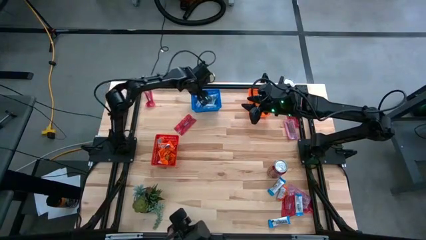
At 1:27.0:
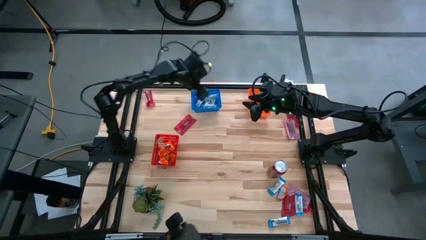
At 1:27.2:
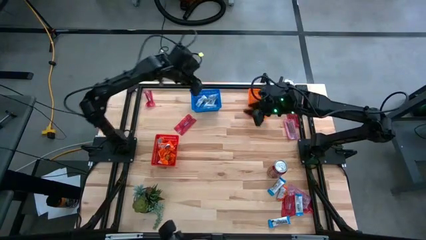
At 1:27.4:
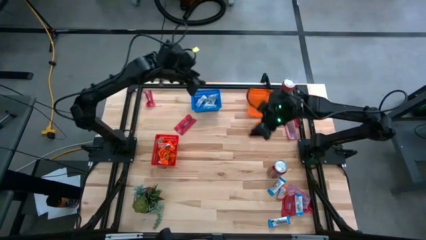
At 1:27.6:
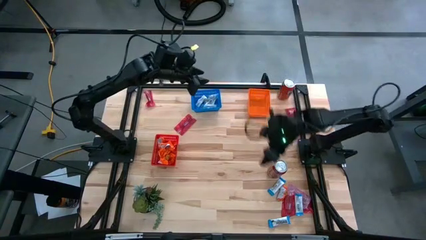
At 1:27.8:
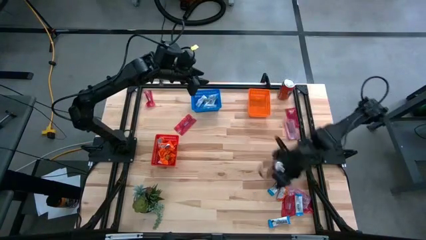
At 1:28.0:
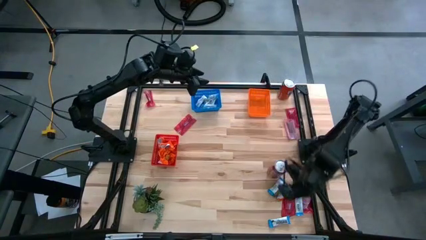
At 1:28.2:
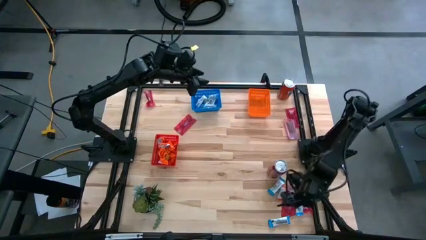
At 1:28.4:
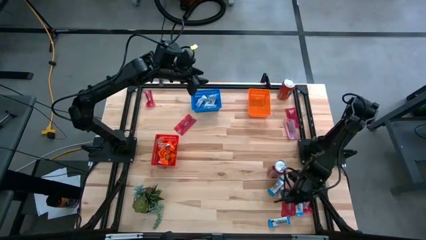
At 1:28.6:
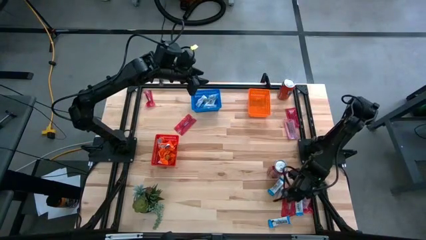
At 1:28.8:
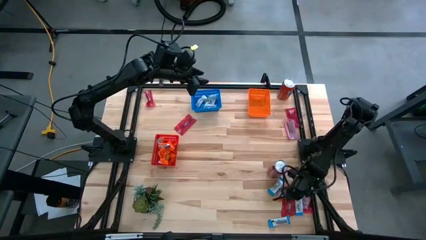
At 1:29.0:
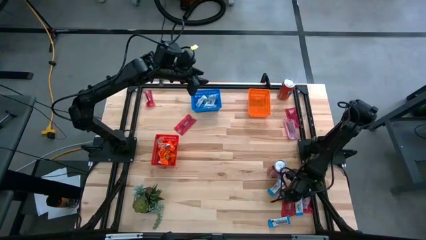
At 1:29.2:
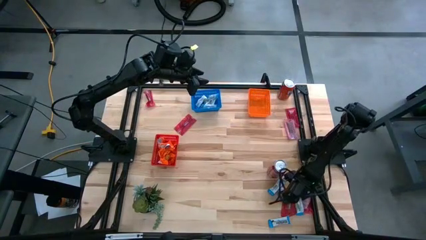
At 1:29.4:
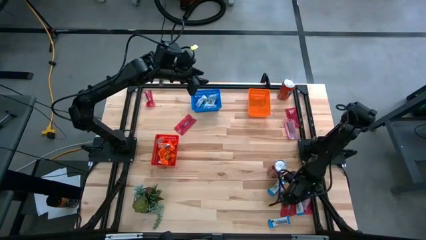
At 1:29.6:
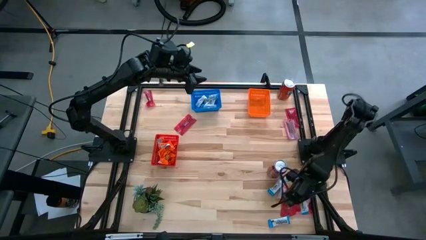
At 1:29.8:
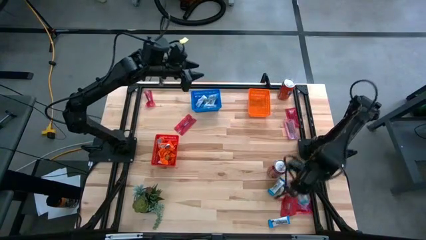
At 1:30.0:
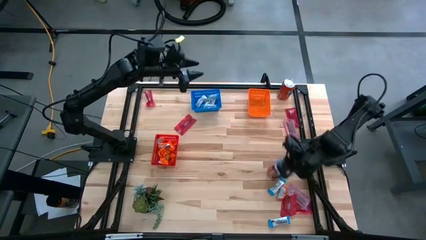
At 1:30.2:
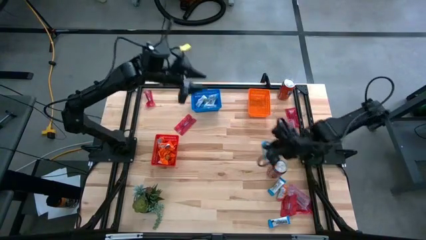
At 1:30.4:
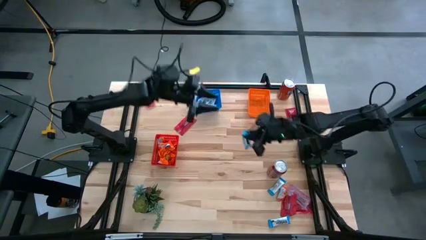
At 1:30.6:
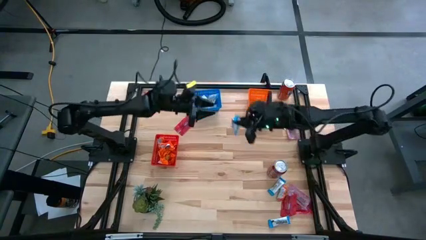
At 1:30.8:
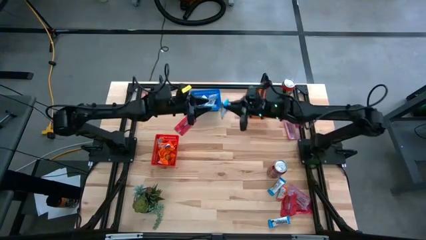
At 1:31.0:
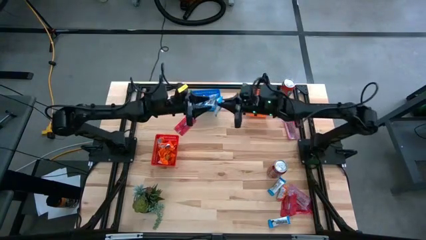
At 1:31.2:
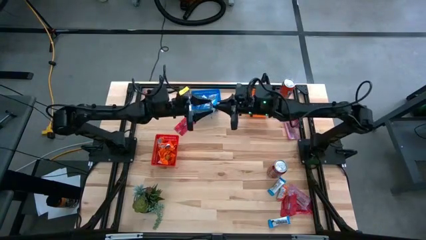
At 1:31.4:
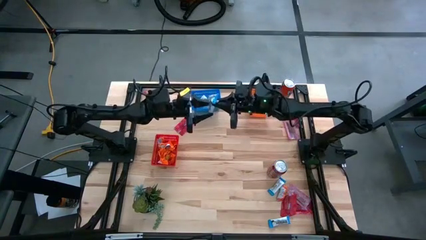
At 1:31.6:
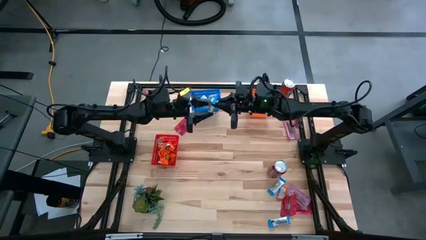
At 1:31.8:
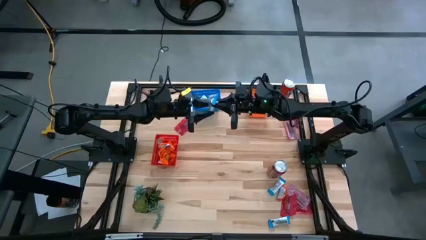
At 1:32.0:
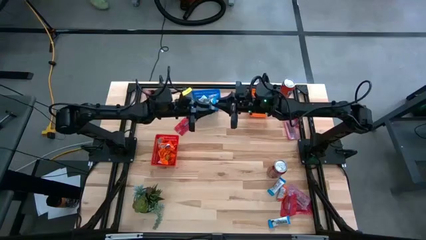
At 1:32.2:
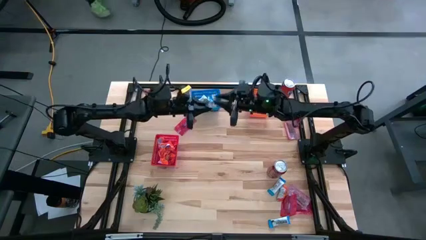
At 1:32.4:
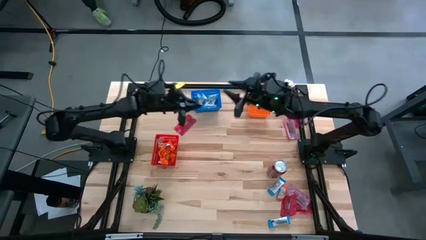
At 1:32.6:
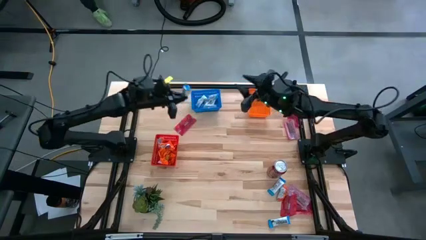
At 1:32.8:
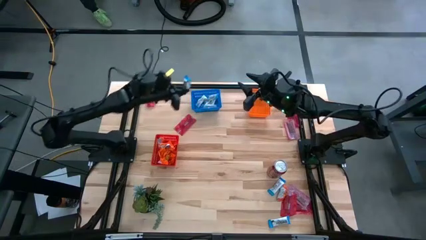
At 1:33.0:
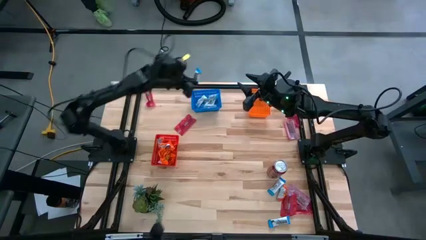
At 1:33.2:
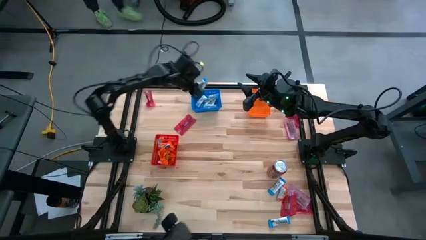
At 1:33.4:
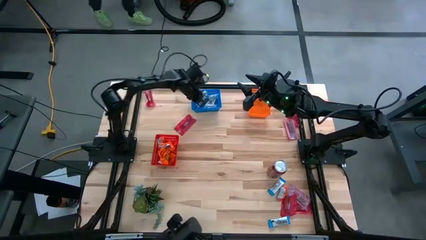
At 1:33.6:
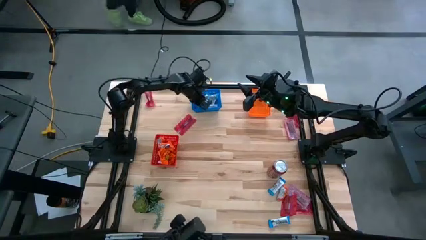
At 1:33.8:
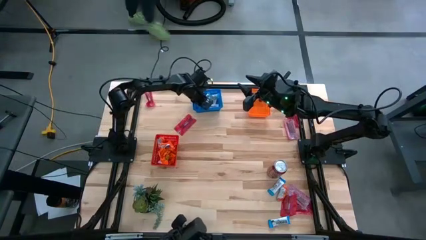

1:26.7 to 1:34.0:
Task: Sort candy
Put the white candy pack into the blue basket

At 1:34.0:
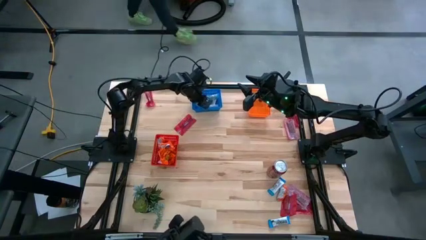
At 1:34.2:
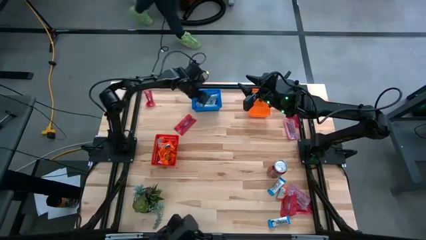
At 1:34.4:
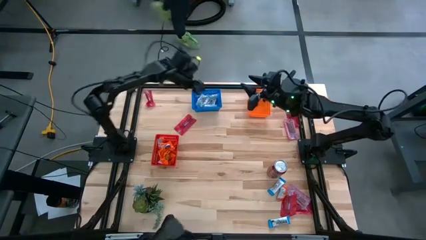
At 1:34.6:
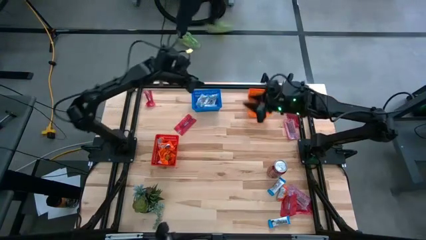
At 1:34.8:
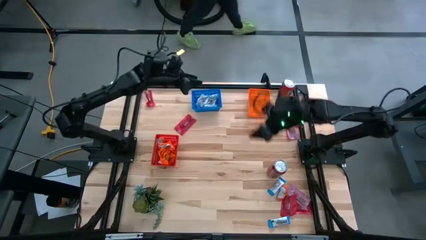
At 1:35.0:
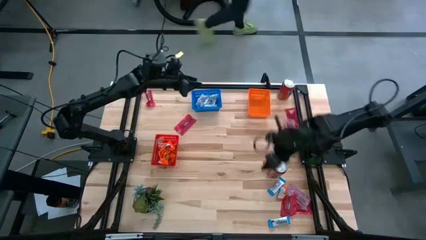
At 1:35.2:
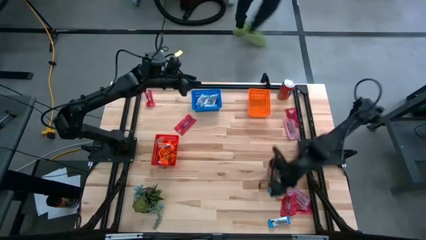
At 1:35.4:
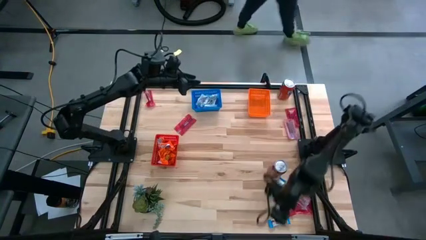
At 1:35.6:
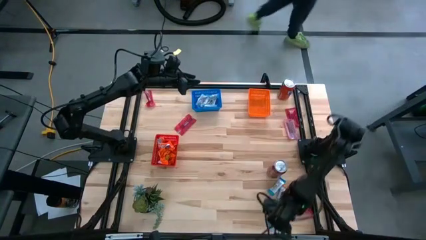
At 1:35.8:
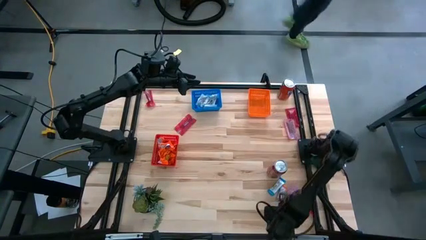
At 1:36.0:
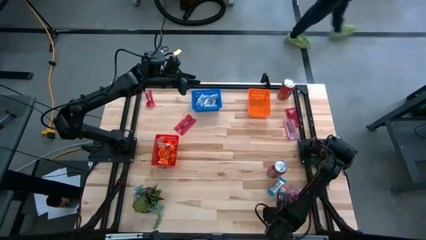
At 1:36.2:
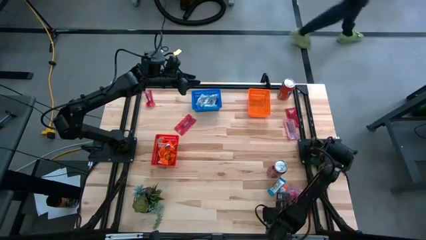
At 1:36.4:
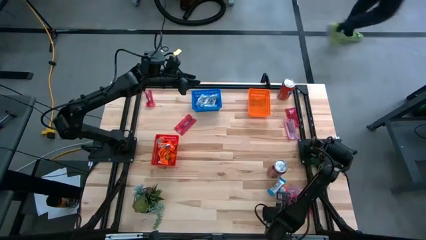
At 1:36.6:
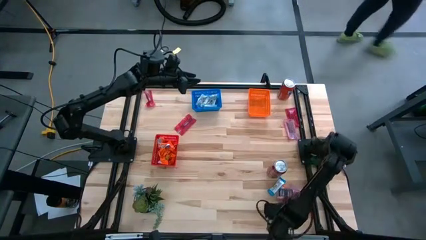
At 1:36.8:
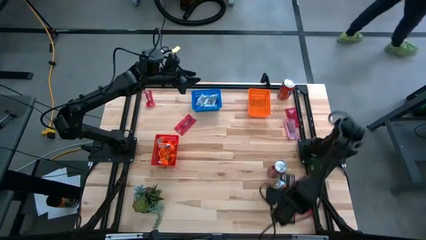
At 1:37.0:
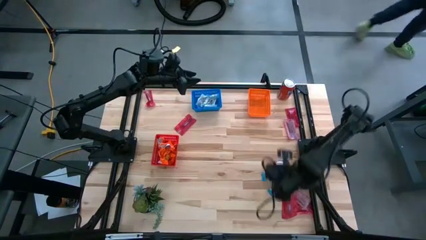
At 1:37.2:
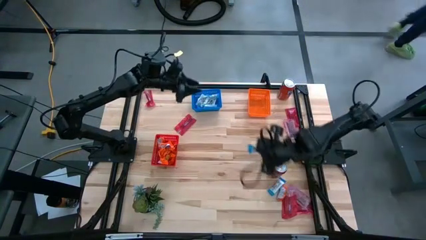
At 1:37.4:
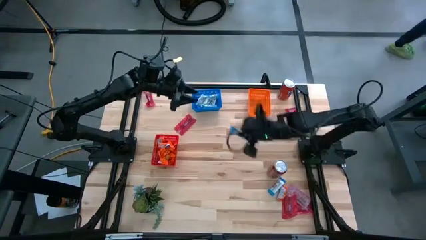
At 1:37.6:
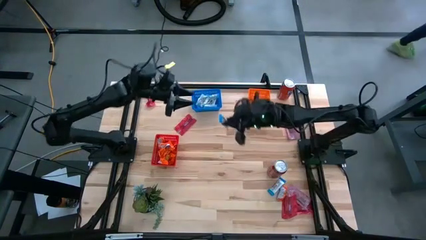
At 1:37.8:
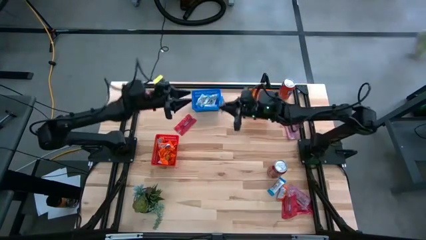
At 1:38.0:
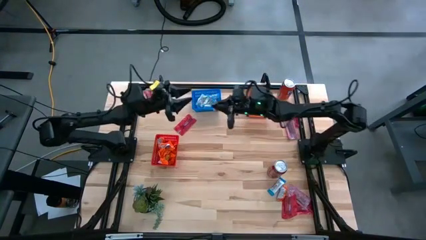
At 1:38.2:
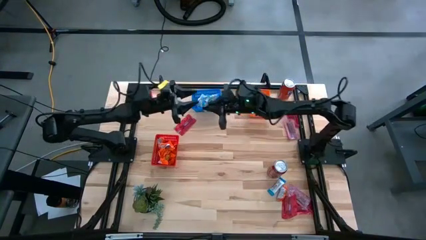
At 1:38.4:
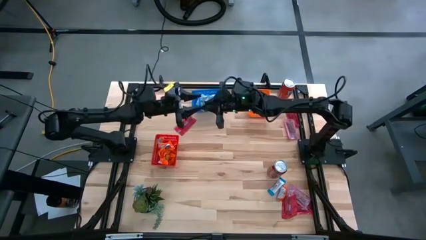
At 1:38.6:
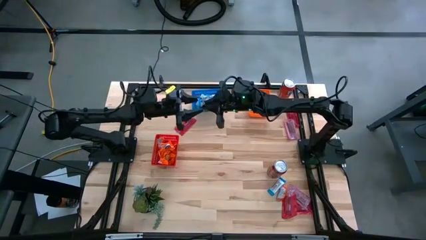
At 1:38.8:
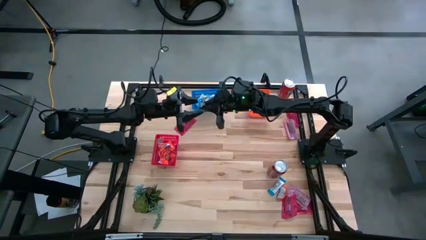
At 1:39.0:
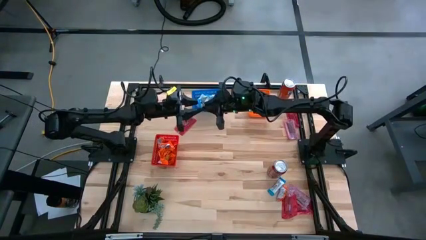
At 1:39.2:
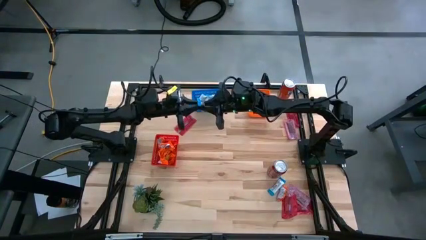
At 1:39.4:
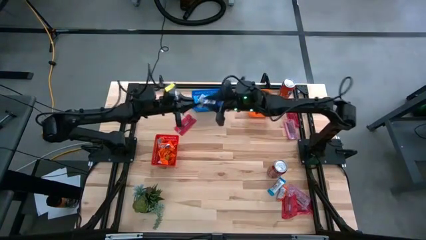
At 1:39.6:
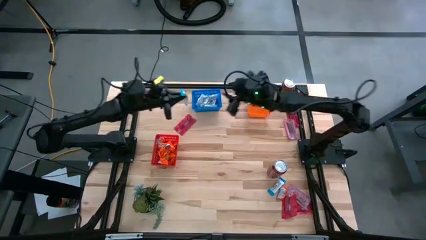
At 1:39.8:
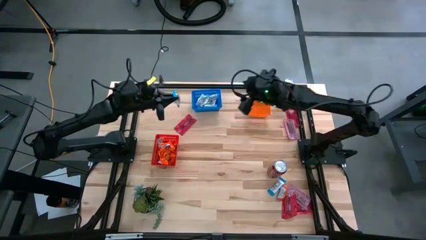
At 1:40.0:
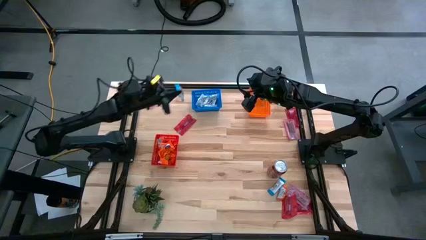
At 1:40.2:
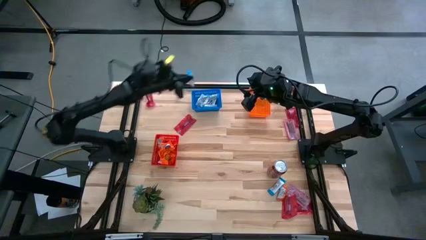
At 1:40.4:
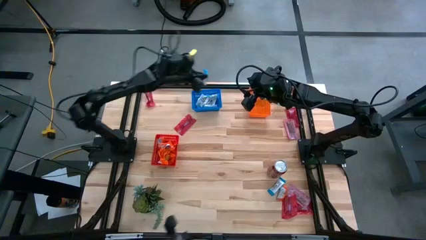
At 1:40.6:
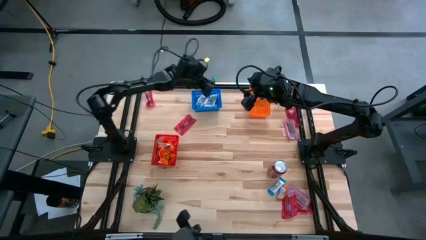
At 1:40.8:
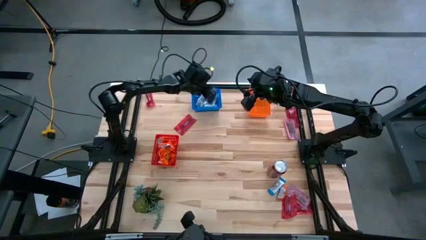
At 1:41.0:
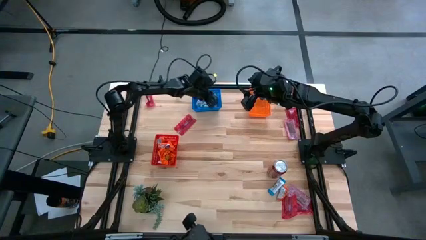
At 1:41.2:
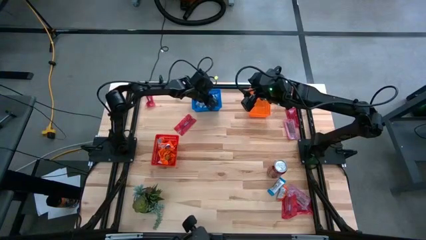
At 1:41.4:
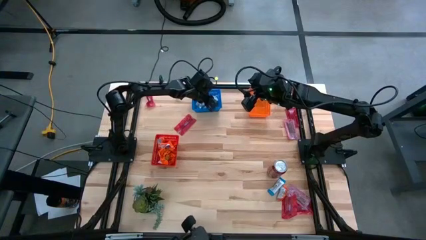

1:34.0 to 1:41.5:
Put the white candy pack into the blue basket
